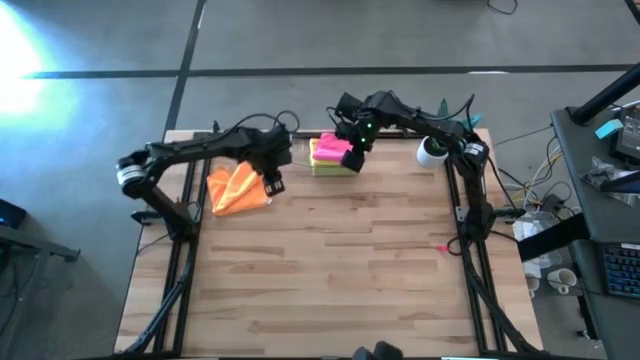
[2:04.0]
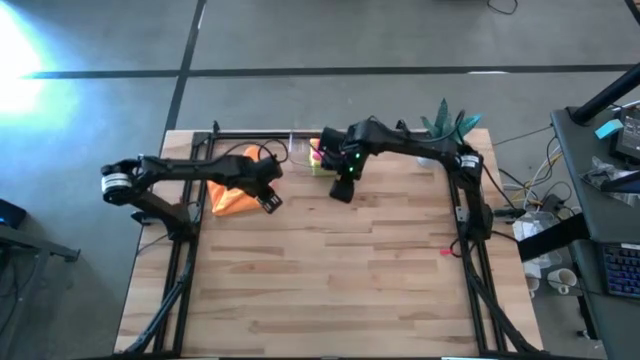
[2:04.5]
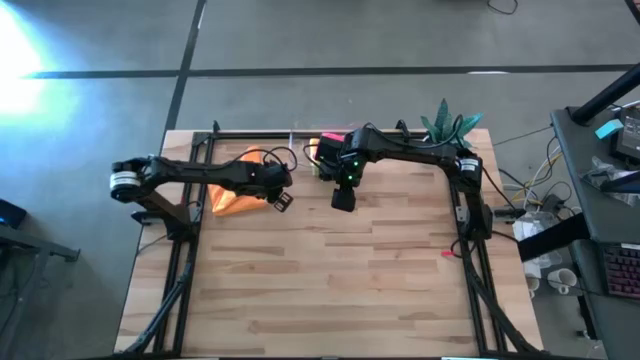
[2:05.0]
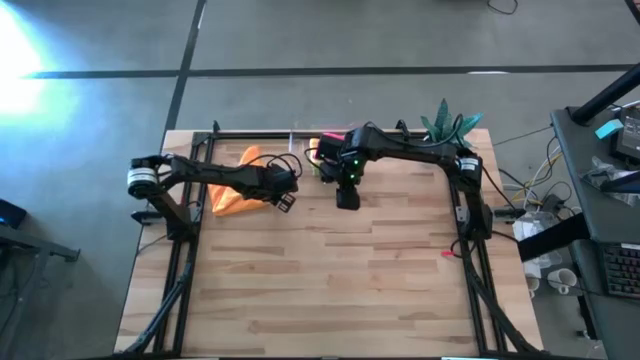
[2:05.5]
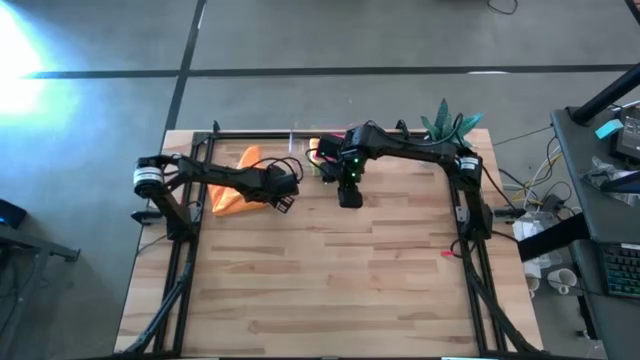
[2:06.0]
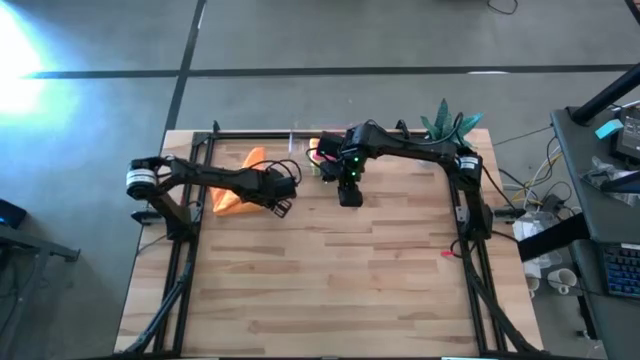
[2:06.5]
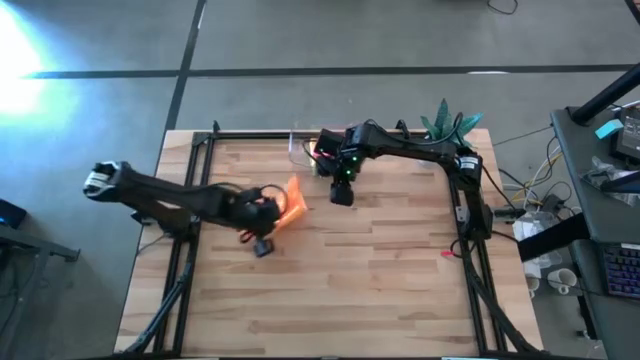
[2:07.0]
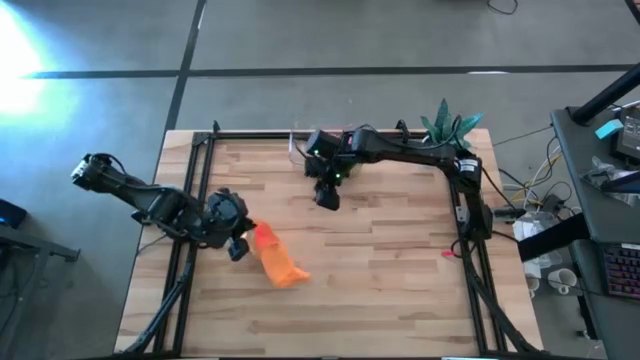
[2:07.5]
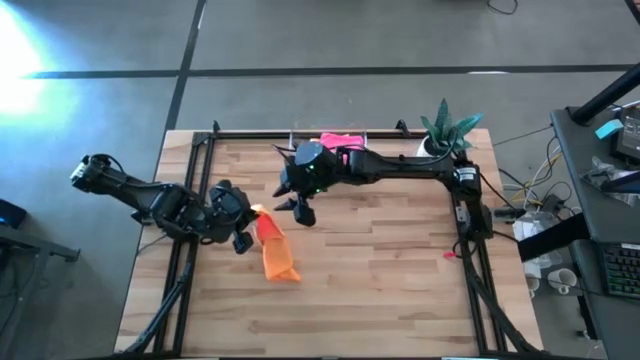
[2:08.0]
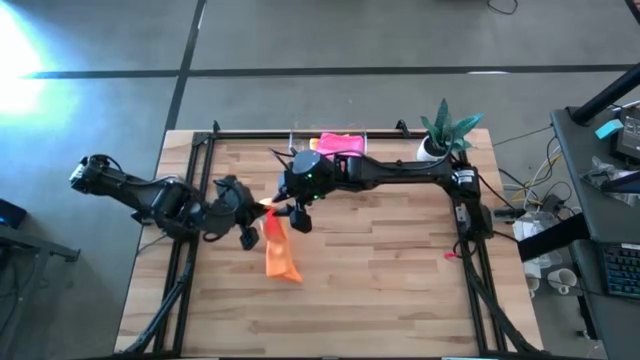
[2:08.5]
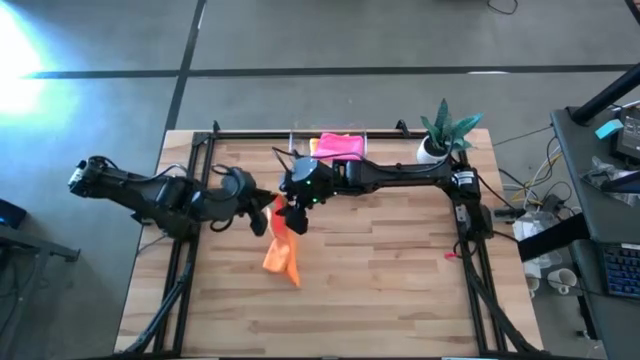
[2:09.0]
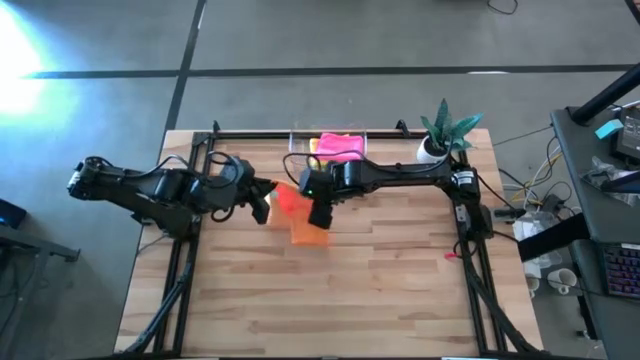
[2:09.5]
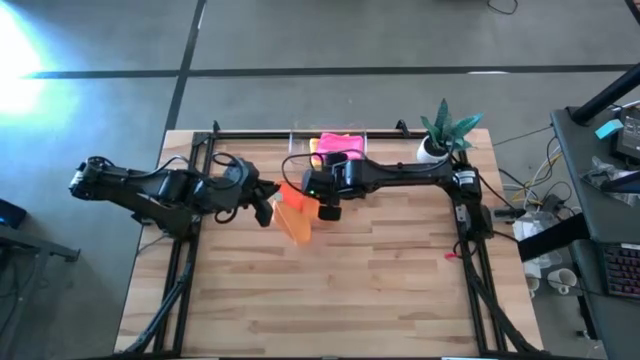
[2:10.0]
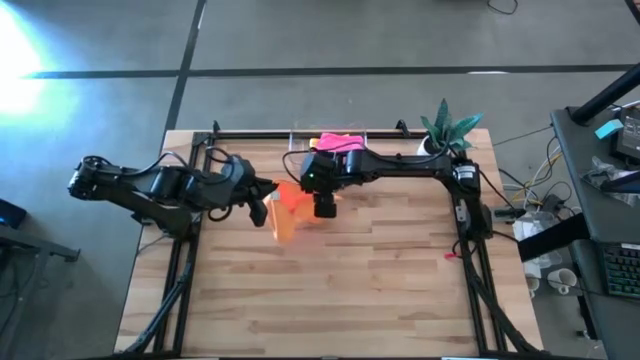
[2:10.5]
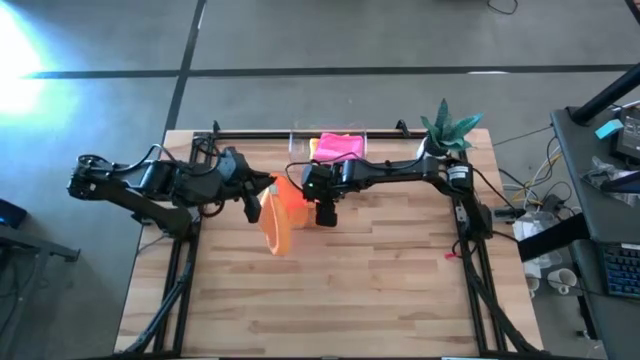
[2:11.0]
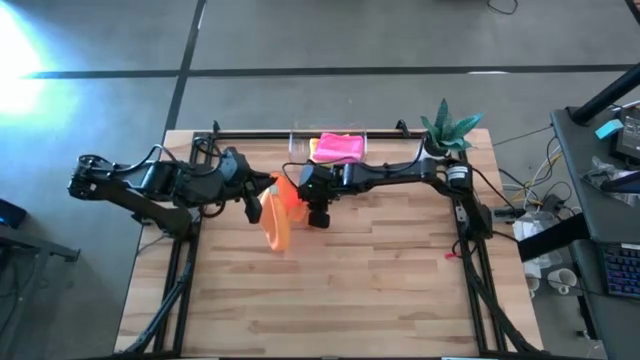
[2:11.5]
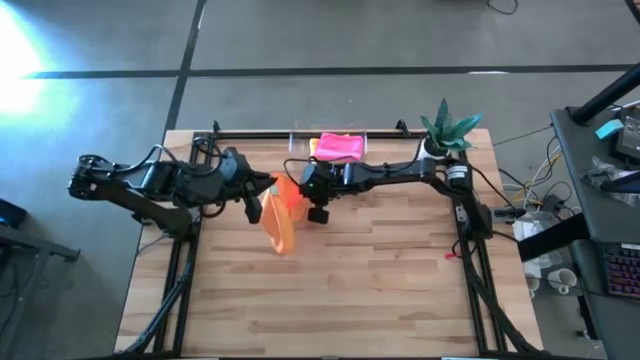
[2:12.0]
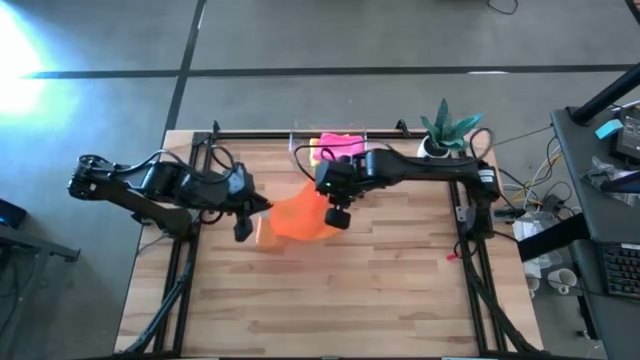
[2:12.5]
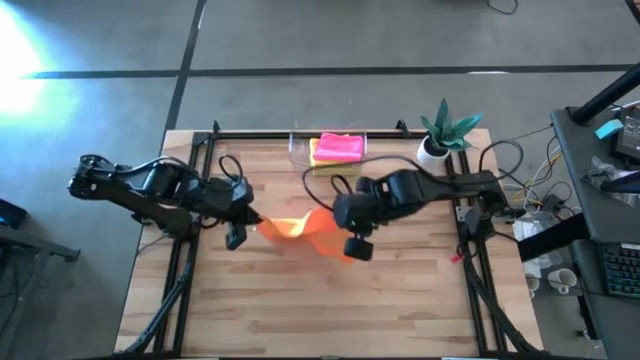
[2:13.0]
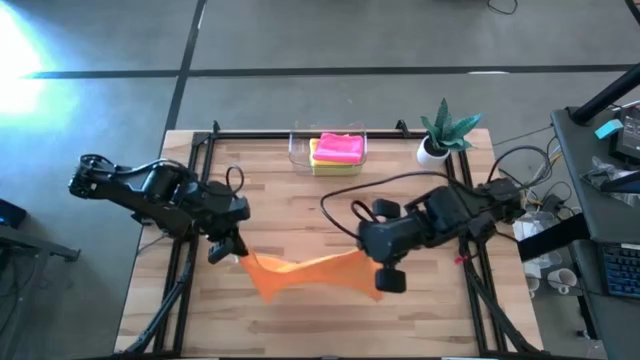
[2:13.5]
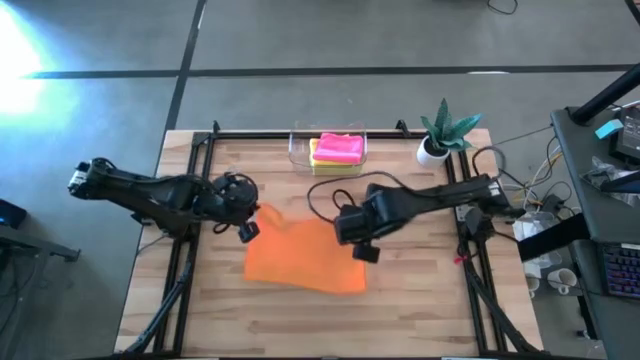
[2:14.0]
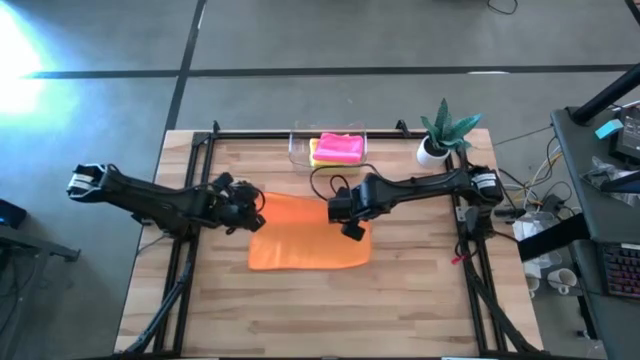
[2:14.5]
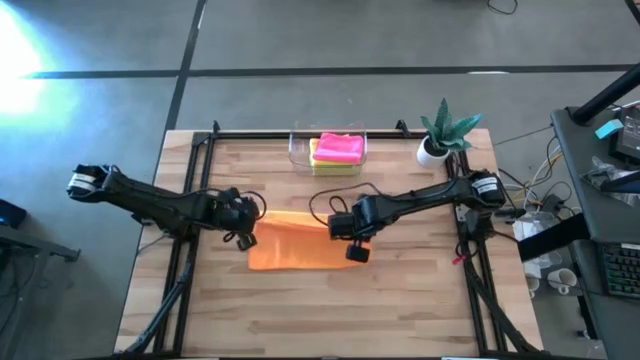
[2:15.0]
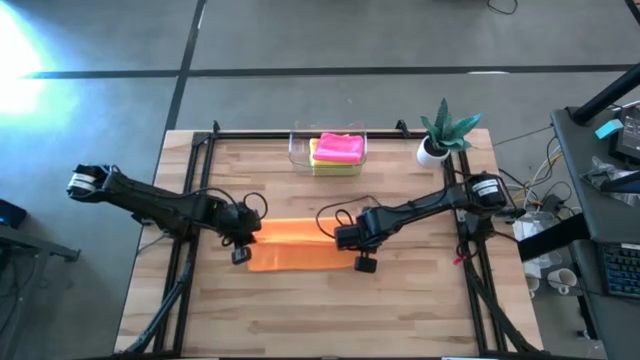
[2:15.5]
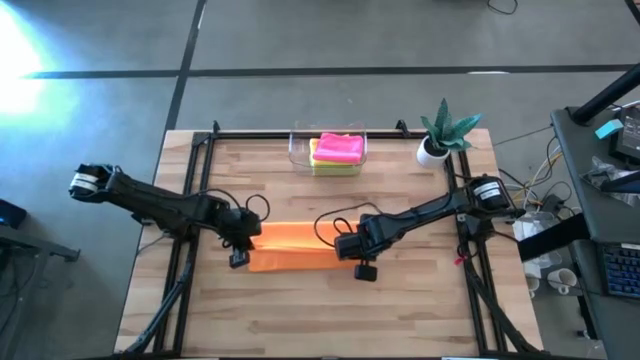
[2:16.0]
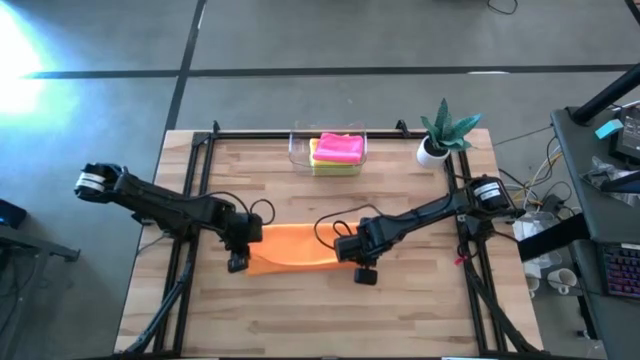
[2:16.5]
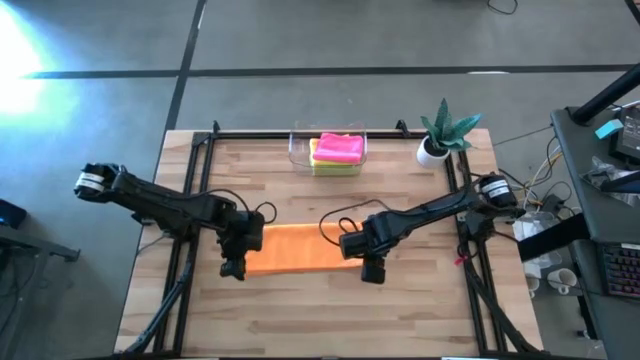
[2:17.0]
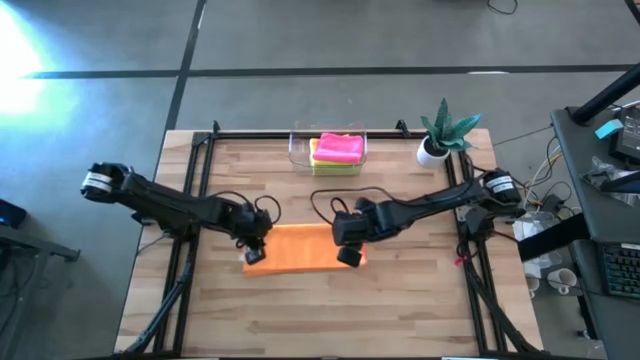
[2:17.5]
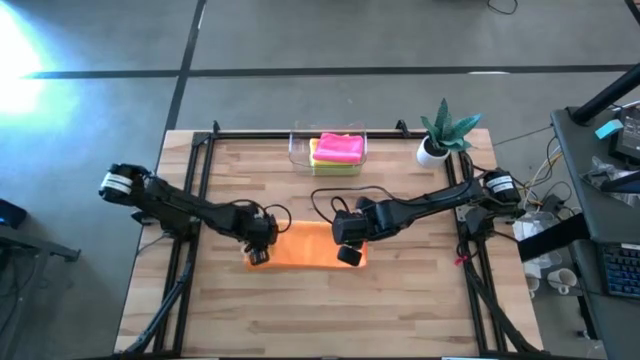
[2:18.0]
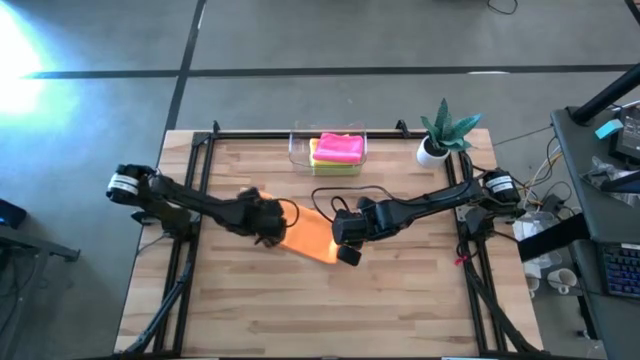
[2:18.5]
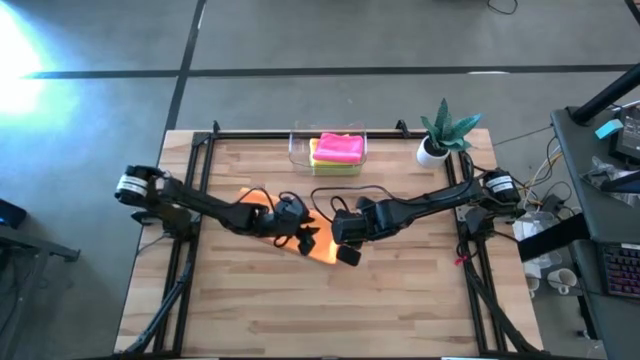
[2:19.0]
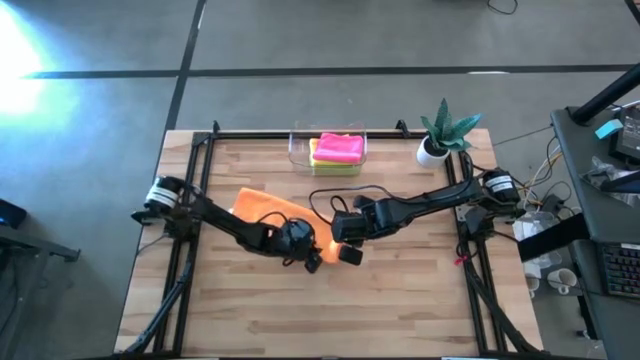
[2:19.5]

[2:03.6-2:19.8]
Task: Fold microfiber towels
Fold the orange towel on the table

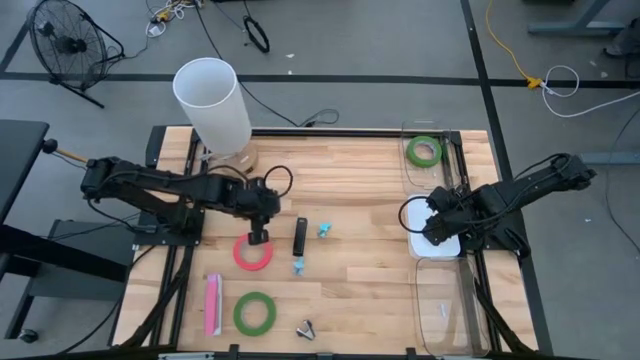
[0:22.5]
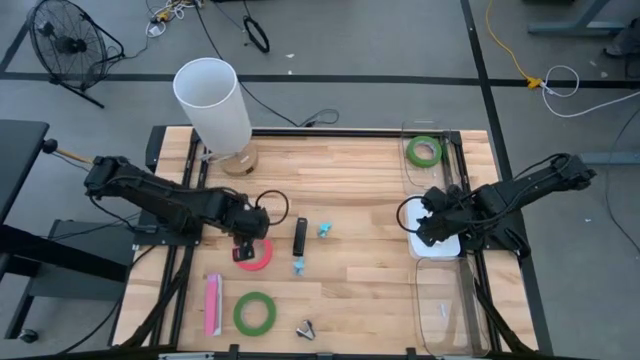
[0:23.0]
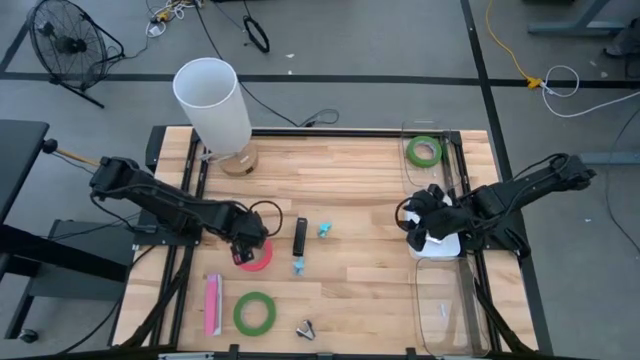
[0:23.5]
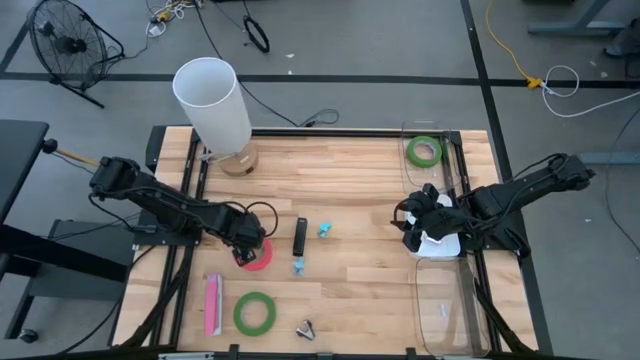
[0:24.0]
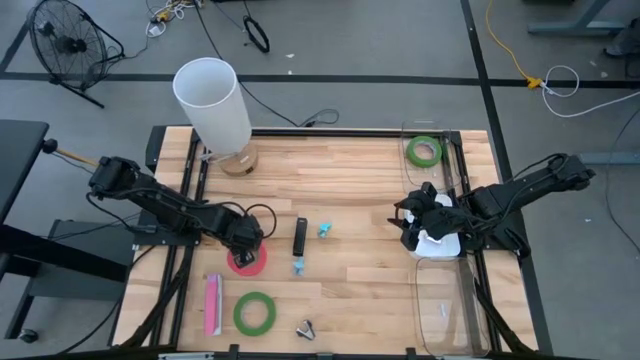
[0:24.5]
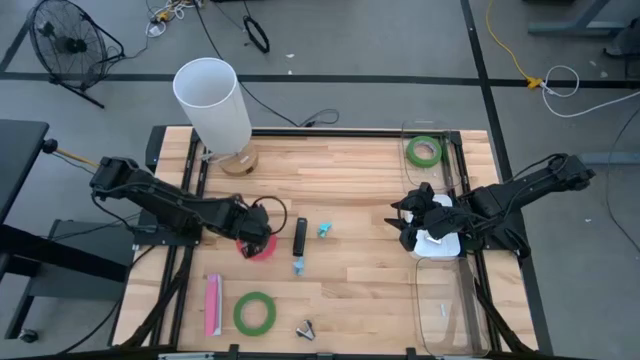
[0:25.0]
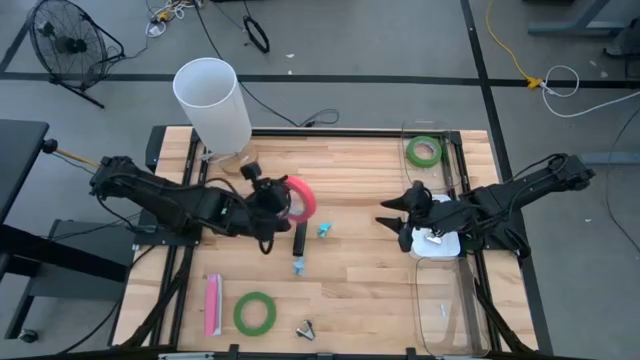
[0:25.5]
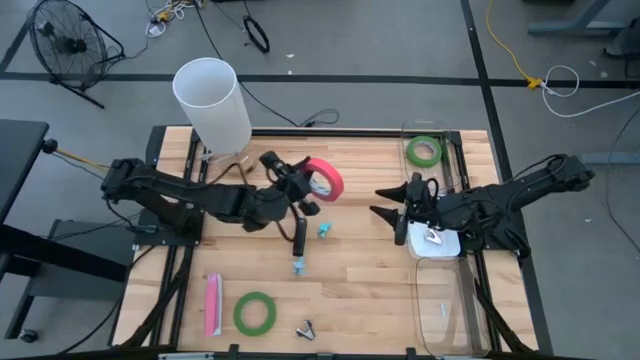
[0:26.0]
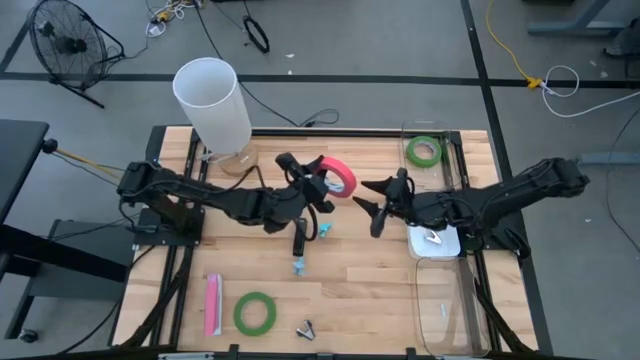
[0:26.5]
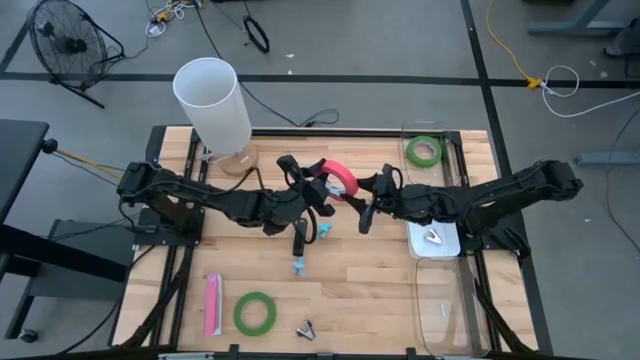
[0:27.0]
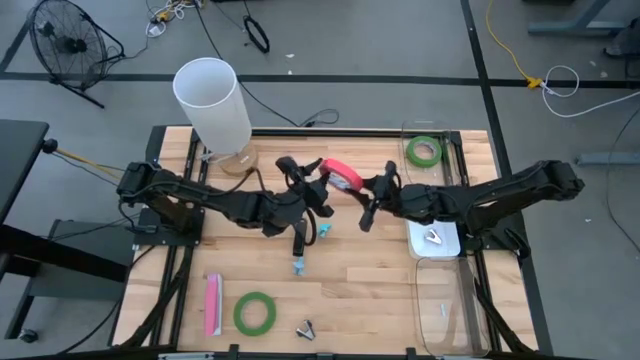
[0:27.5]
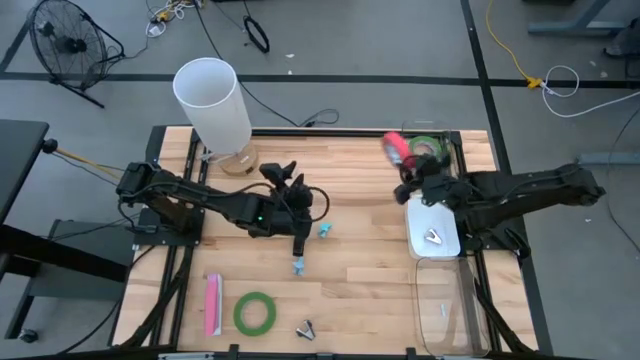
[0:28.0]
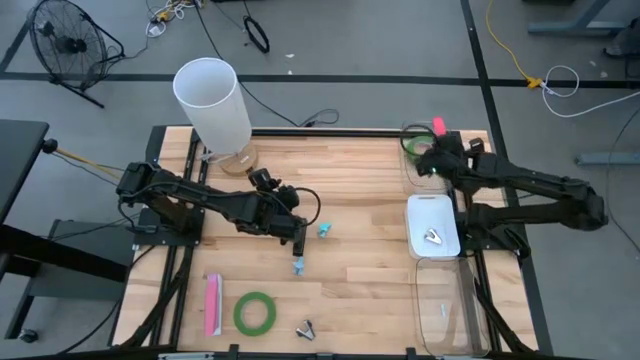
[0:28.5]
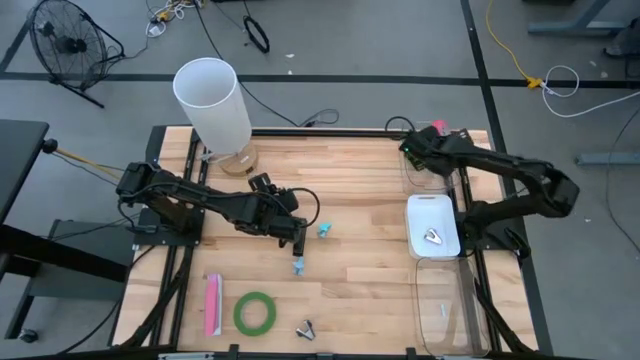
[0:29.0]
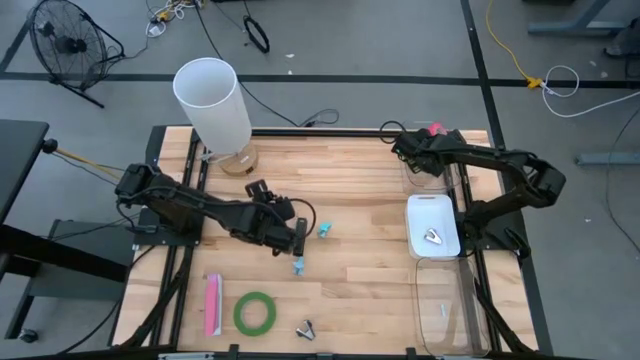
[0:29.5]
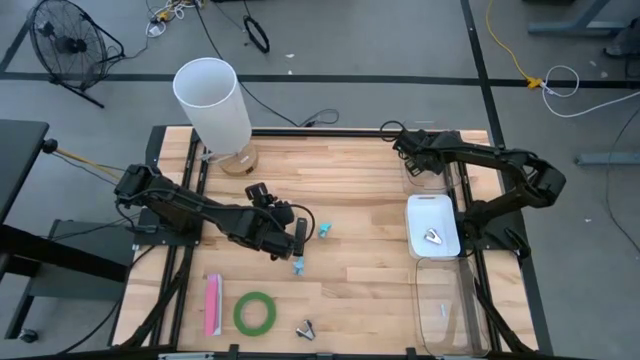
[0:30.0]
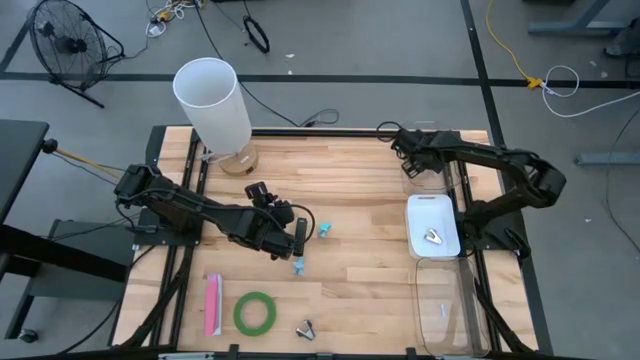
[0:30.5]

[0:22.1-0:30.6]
Task: Pick and place Stapler, Stapler remover, tape
Put the pink masking tape into the top transparent bin
